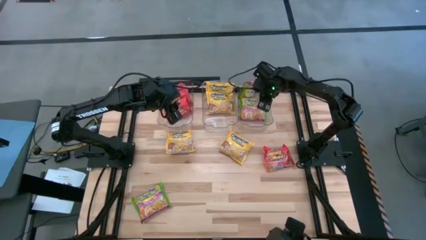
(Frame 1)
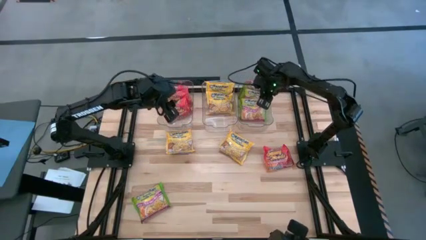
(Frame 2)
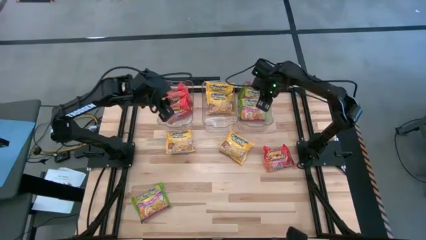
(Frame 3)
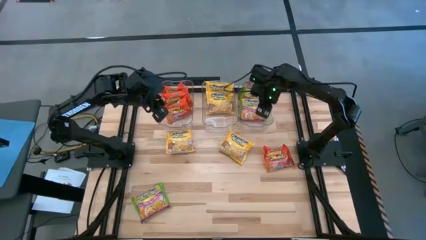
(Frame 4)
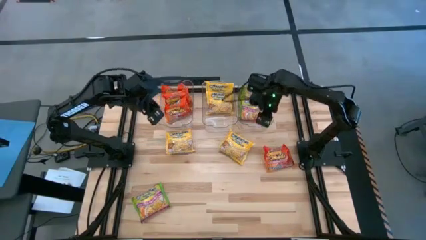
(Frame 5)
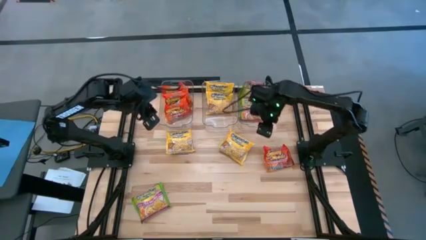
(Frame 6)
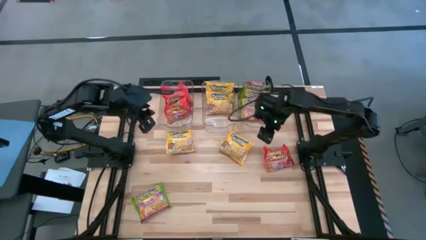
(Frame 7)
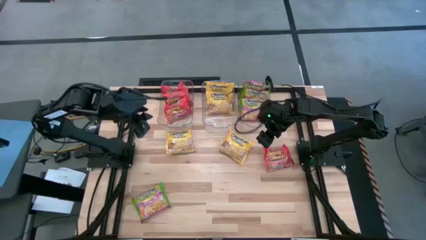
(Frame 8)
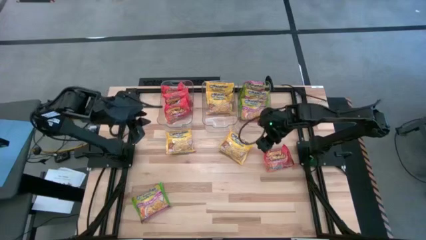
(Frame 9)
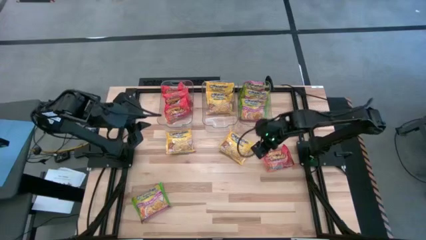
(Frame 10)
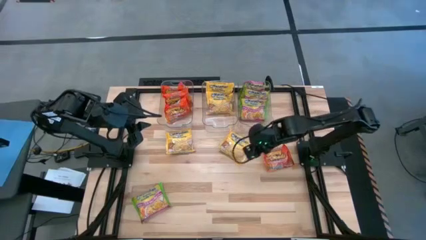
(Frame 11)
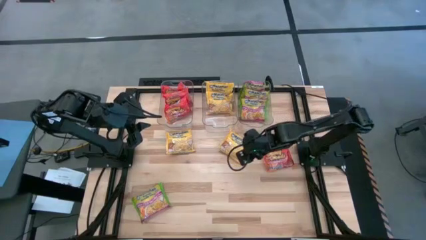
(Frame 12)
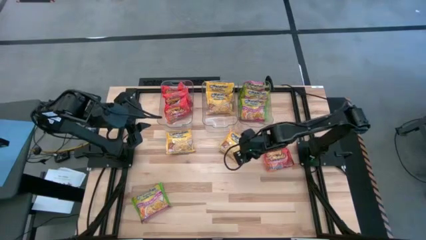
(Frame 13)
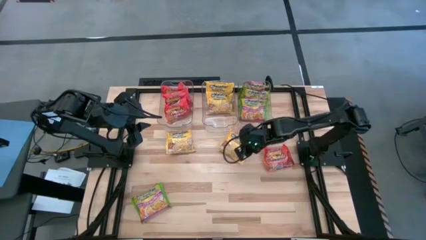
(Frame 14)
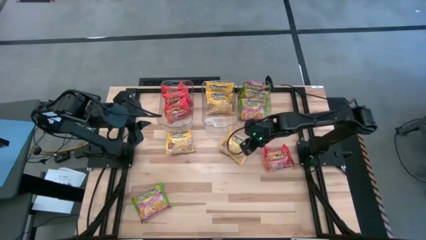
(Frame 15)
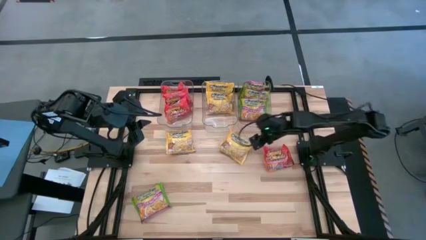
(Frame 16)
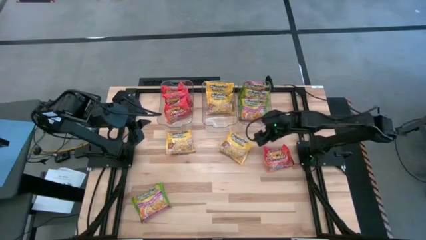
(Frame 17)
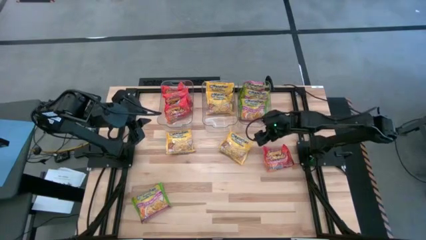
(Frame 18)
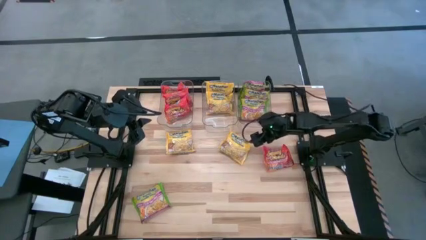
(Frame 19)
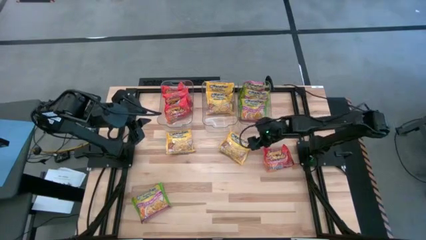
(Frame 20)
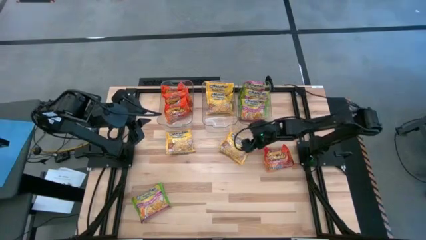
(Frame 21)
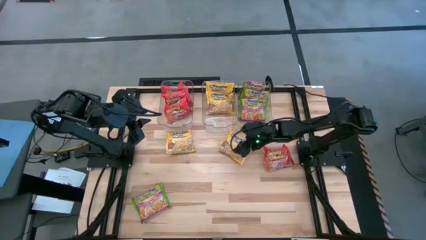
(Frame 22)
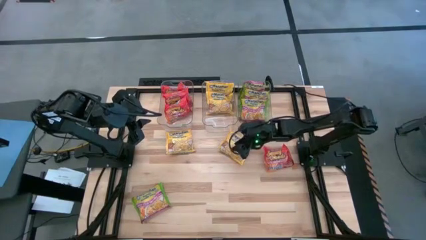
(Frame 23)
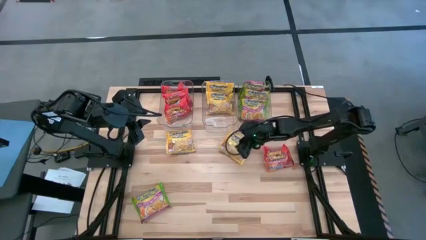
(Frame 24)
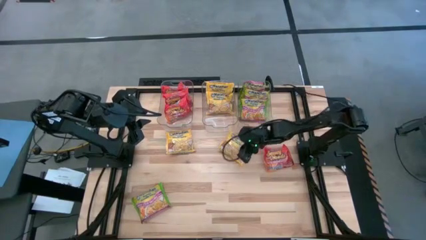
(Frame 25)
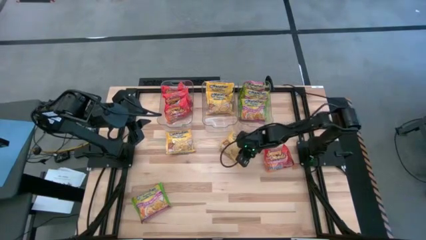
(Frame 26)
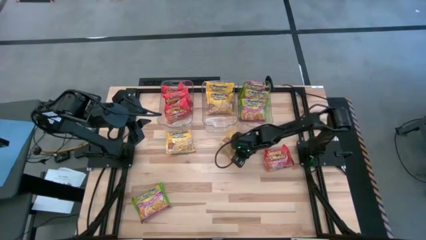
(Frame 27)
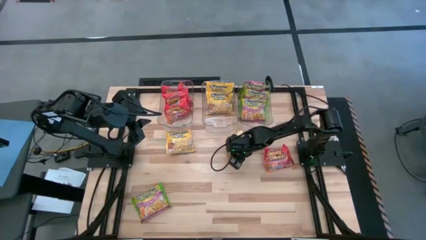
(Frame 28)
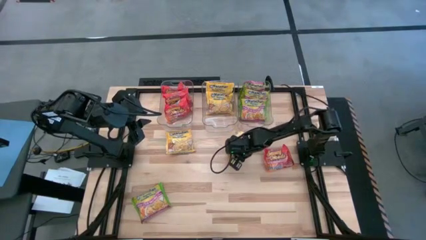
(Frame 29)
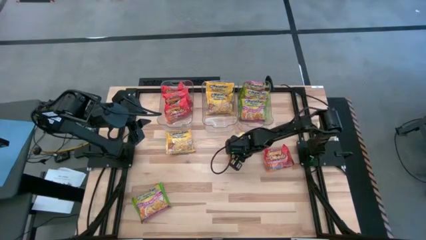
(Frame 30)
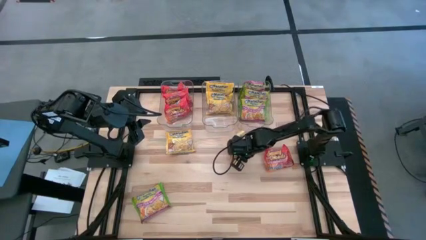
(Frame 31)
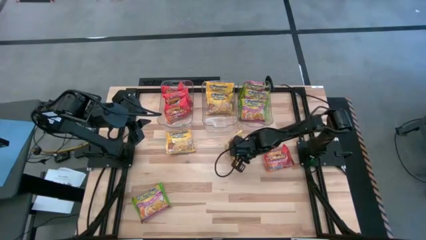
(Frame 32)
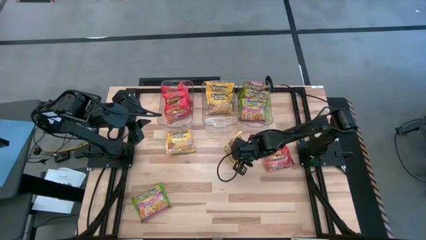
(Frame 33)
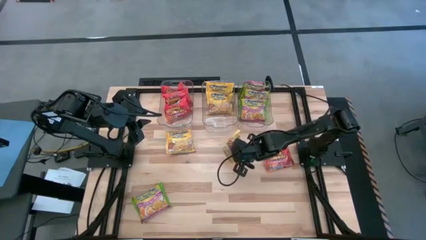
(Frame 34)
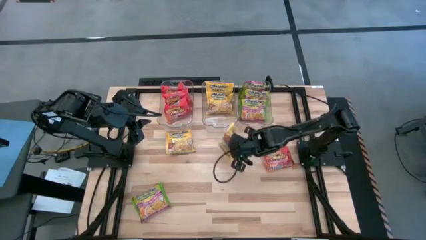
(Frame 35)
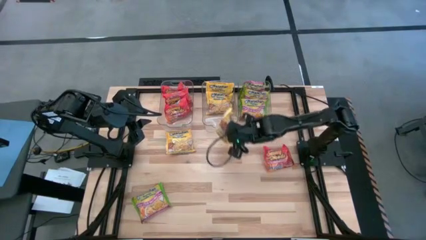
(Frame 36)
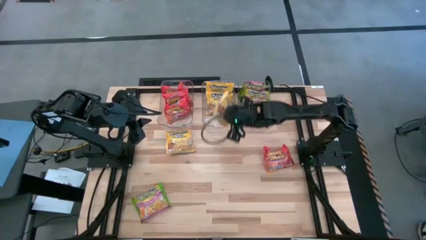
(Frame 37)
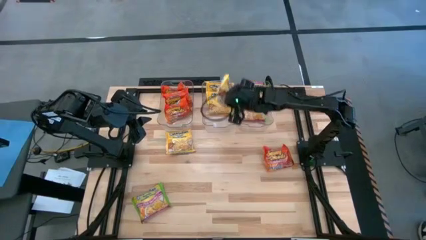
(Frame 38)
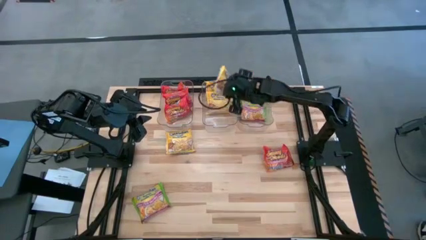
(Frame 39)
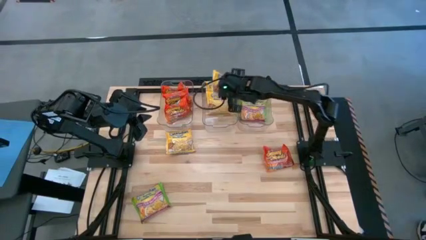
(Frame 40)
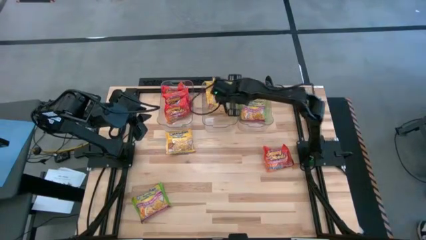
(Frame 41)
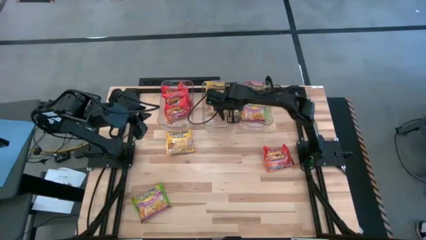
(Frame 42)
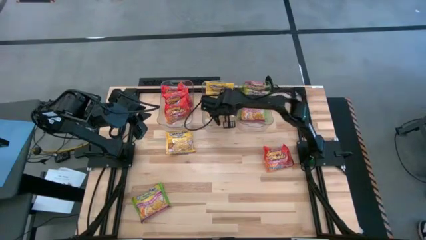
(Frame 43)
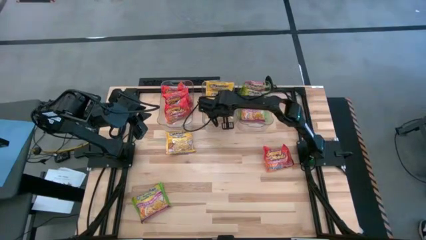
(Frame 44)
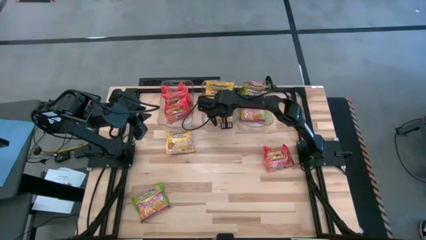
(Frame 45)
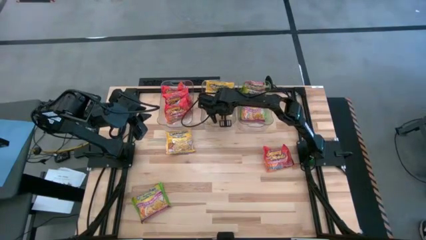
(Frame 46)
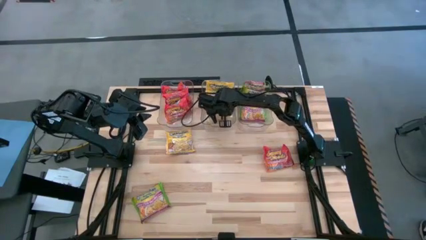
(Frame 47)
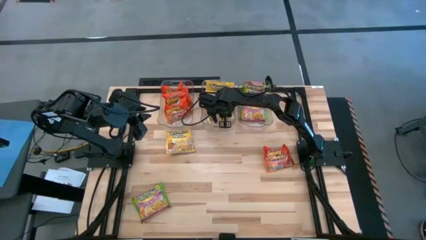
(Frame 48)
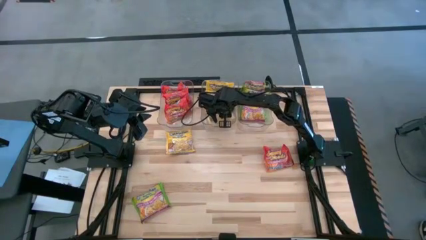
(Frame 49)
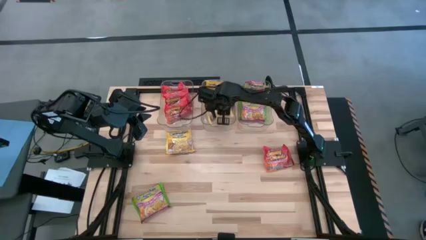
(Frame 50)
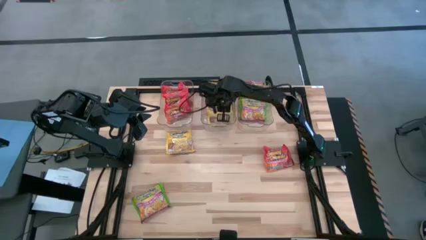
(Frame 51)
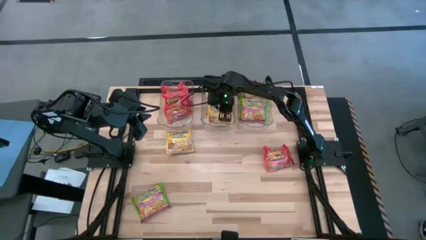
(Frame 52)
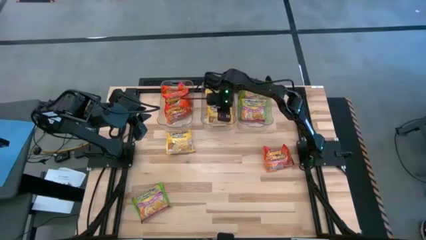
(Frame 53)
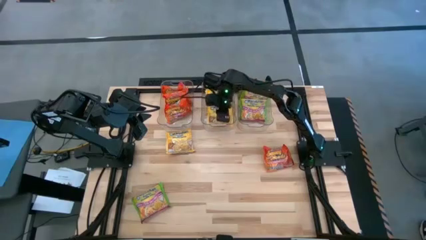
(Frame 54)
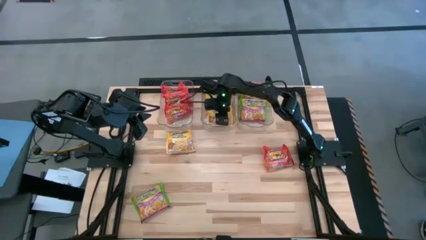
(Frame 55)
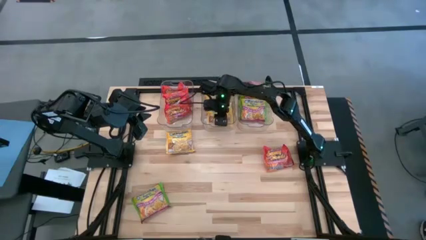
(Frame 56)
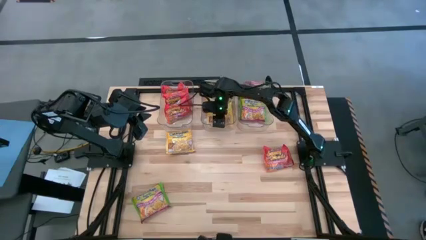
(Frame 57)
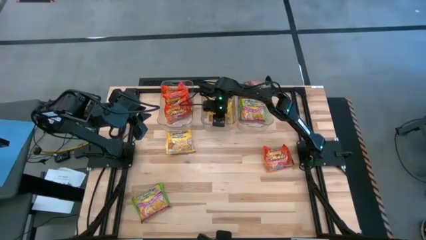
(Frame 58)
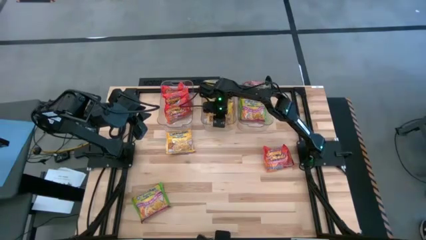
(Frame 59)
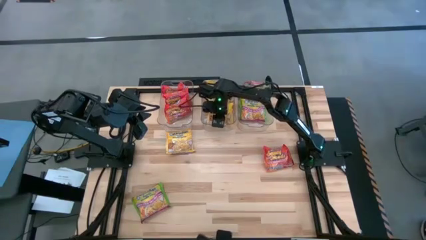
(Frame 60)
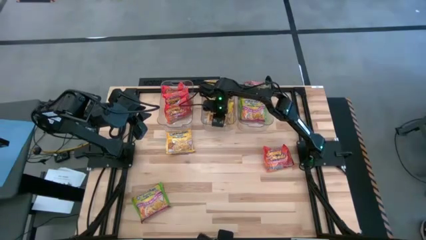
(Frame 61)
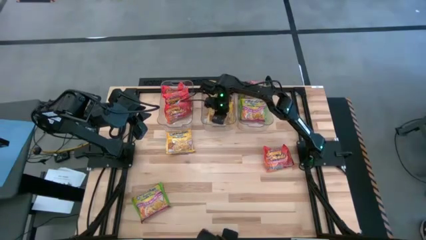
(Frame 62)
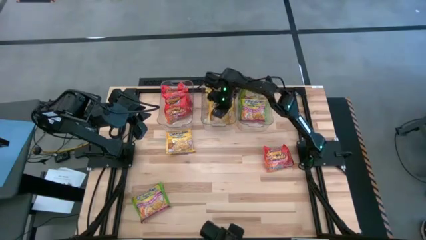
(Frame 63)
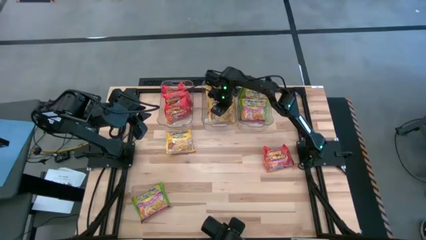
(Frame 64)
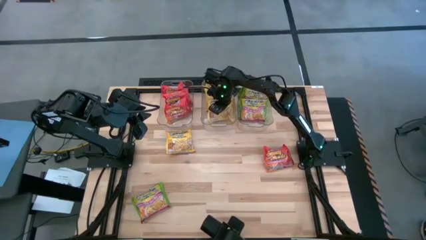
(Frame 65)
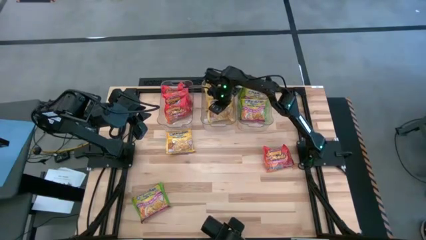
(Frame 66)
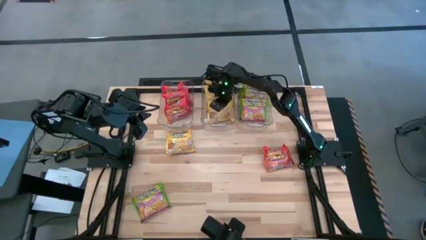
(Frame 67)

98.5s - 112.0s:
Task: Sort Maruchan noodles
Put the yellow noodle pack into the middle transparent bin

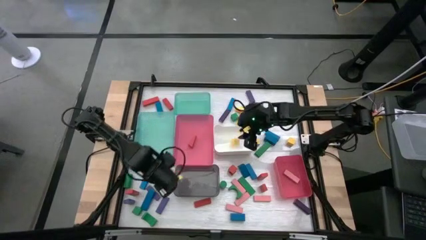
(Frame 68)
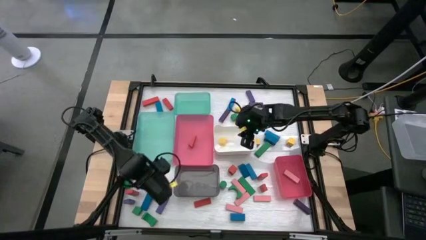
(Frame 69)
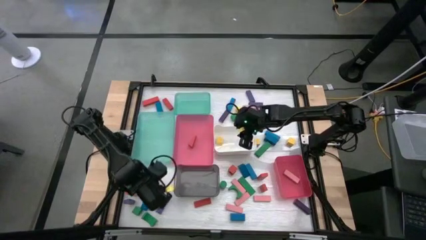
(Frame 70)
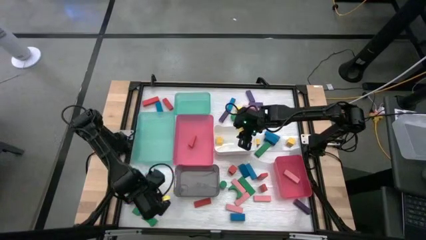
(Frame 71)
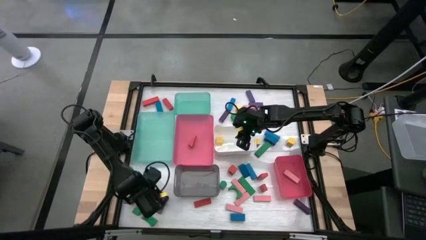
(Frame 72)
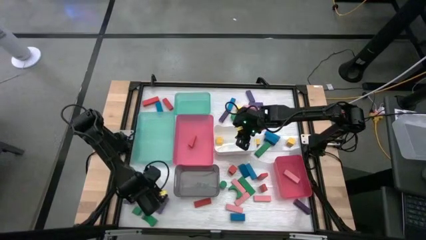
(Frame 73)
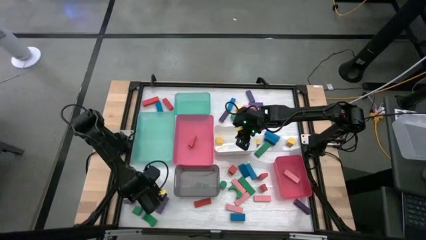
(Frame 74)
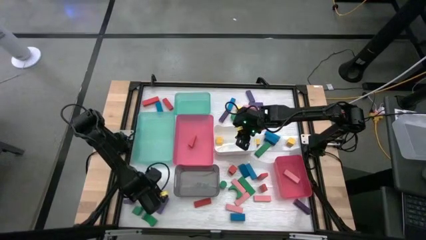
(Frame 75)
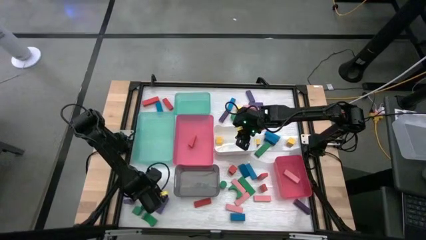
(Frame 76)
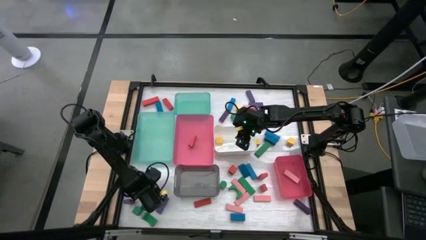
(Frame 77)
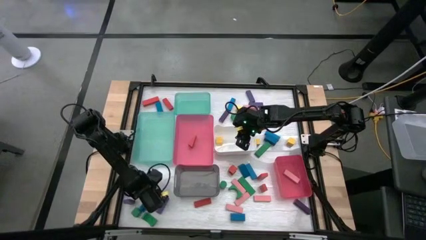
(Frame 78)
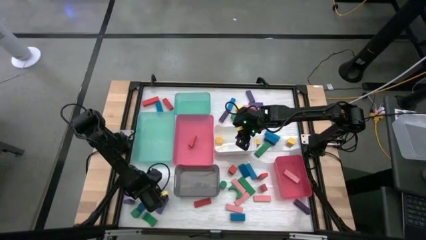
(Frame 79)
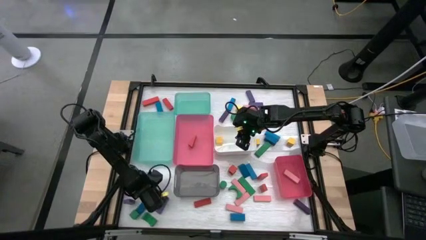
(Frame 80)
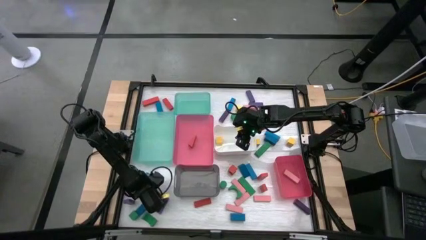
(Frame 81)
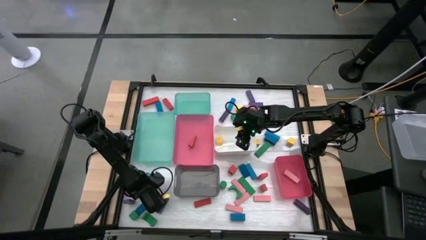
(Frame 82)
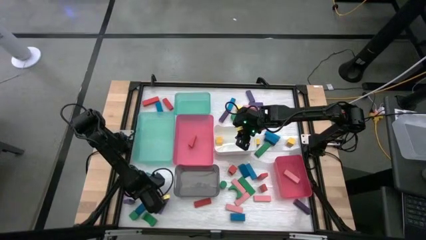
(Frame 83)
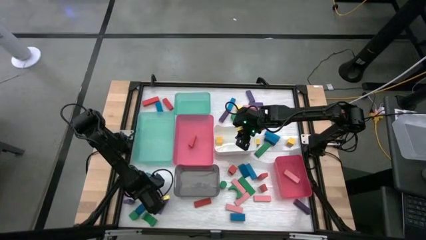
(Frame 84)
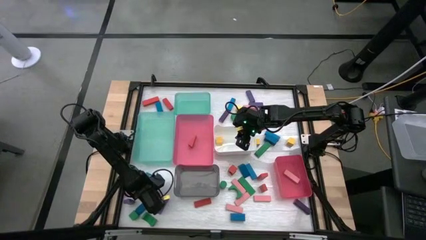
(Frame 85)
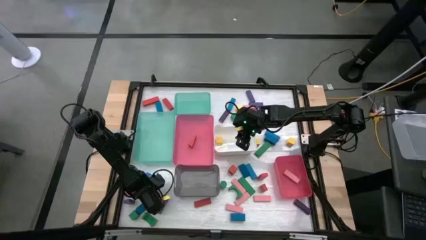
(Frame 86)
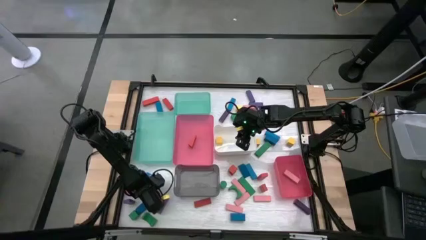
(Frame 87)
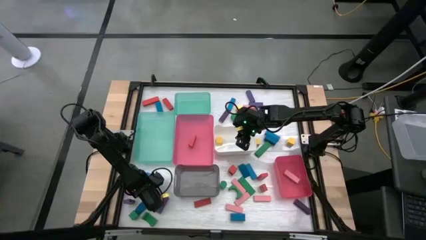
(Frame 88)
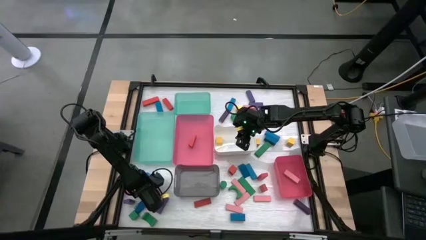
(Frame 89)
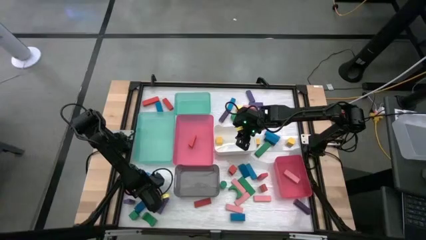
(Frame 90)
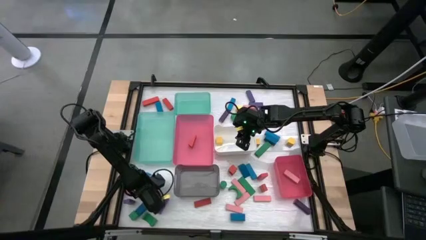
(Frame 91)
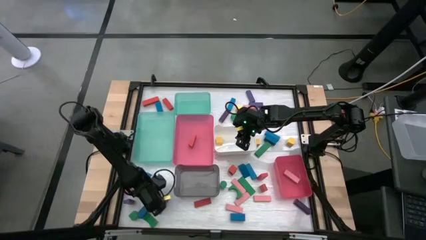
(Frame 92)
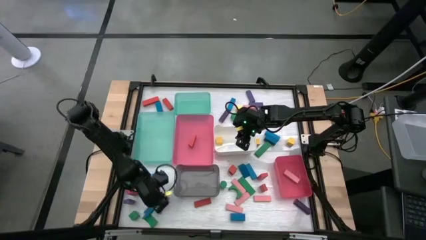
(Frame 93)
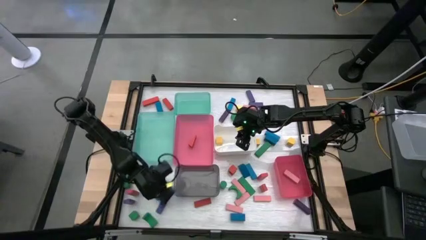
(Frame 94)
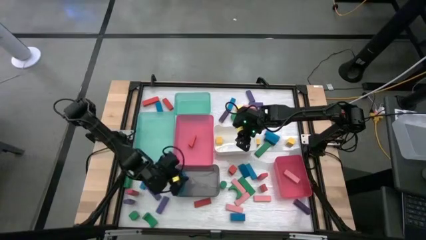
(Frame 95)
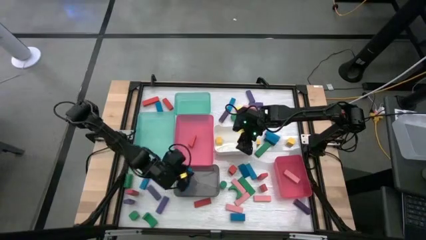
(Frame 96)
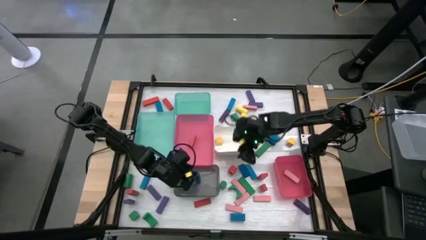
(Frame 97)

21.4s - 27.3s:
Task: Sort blocks
Put the blue block into the black bin
